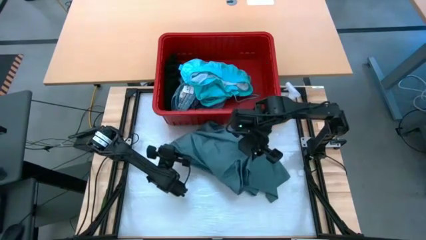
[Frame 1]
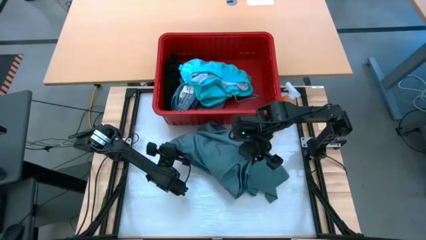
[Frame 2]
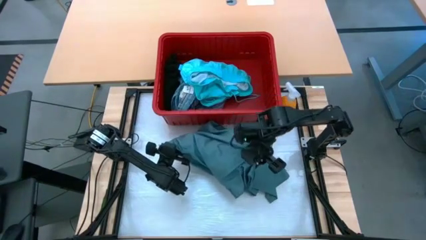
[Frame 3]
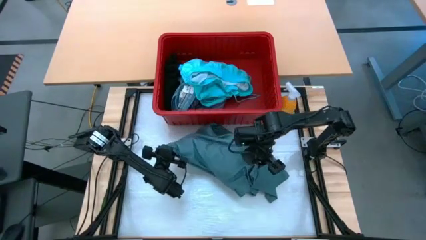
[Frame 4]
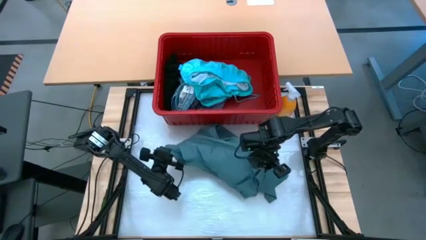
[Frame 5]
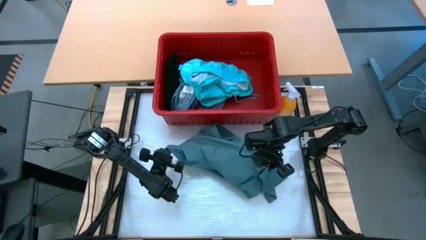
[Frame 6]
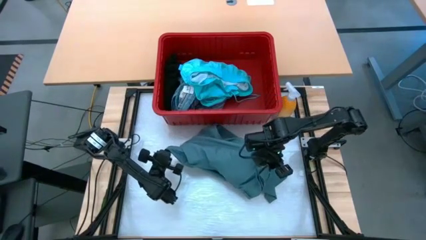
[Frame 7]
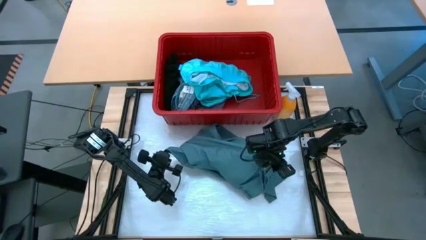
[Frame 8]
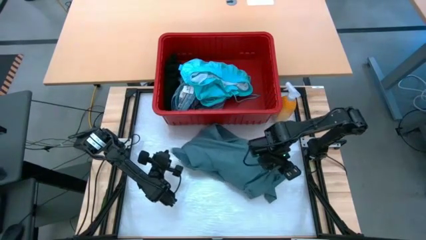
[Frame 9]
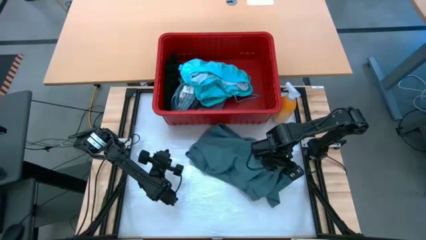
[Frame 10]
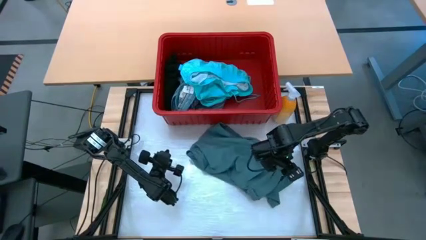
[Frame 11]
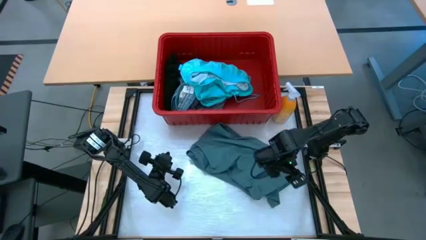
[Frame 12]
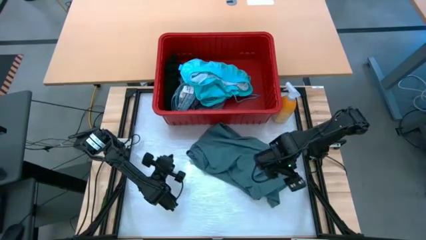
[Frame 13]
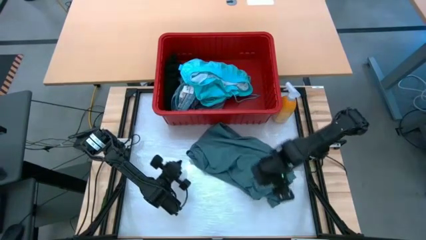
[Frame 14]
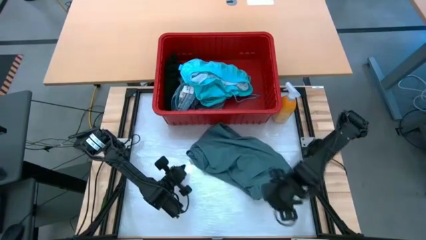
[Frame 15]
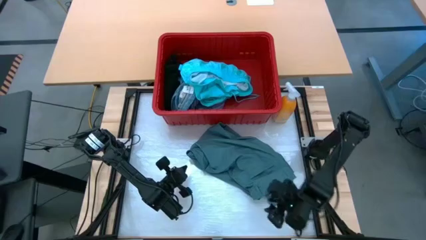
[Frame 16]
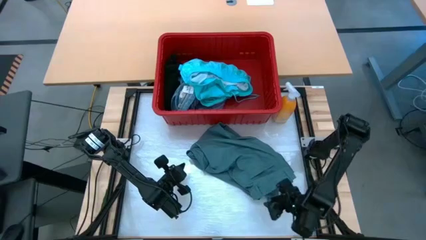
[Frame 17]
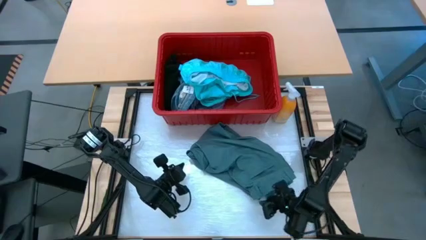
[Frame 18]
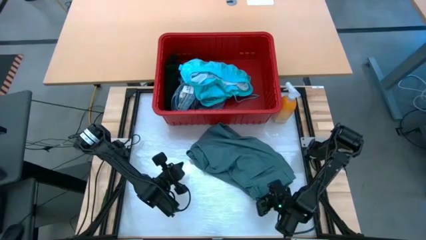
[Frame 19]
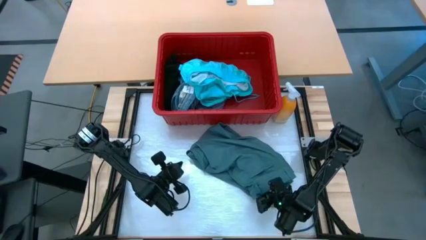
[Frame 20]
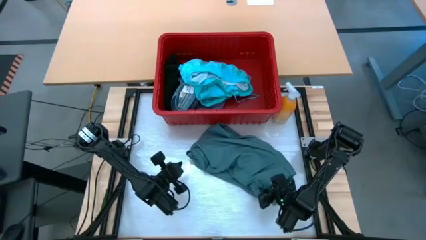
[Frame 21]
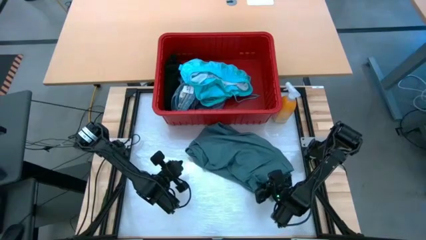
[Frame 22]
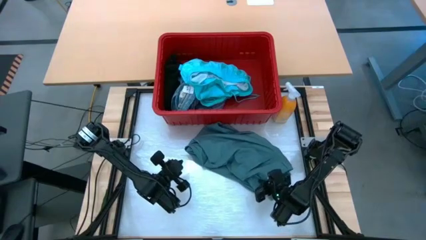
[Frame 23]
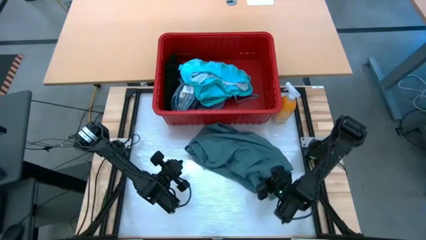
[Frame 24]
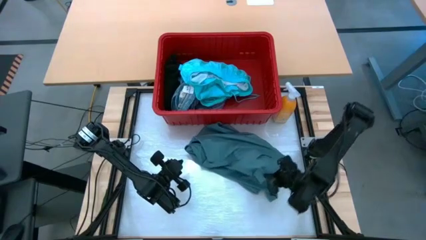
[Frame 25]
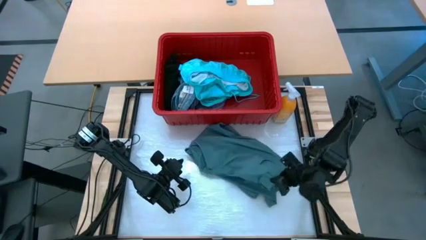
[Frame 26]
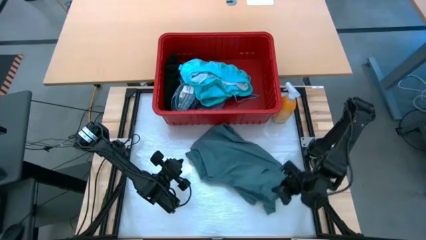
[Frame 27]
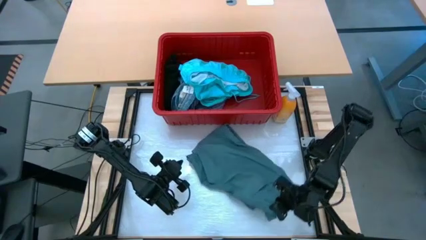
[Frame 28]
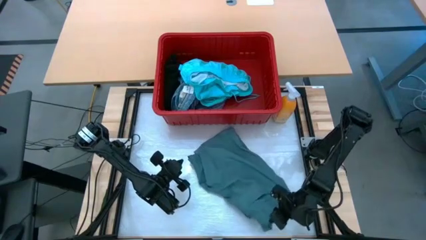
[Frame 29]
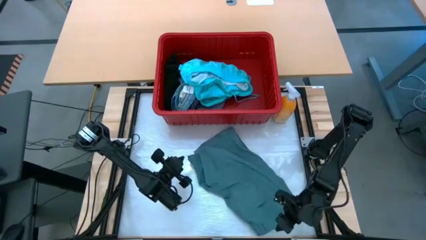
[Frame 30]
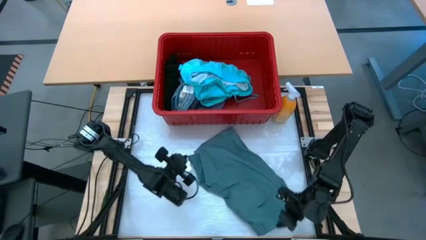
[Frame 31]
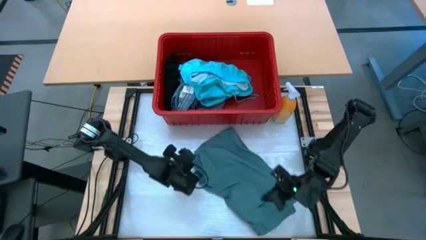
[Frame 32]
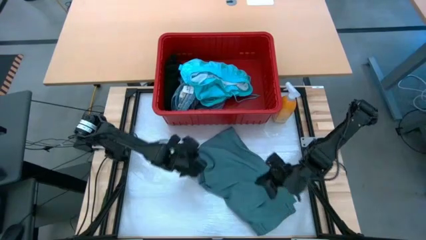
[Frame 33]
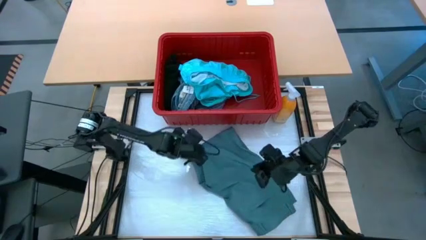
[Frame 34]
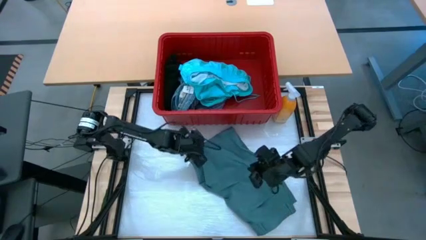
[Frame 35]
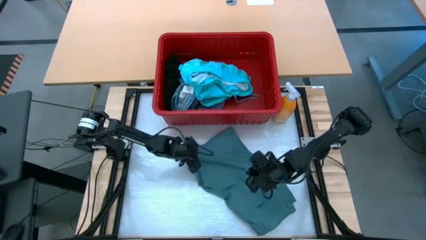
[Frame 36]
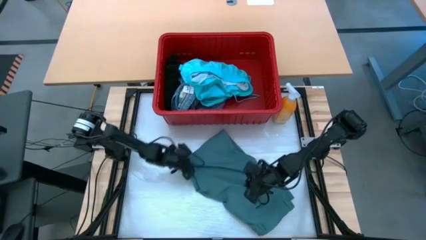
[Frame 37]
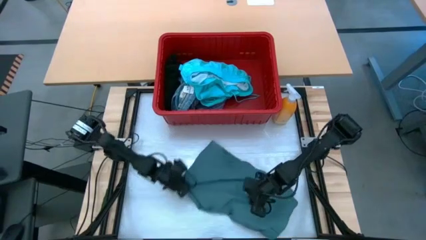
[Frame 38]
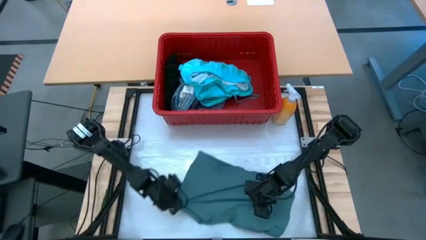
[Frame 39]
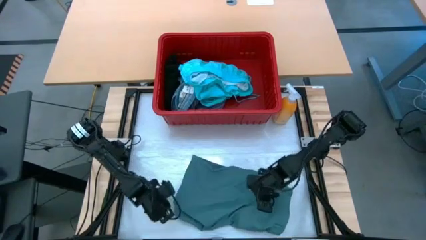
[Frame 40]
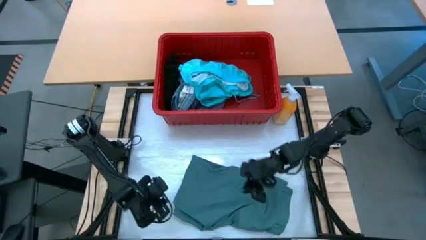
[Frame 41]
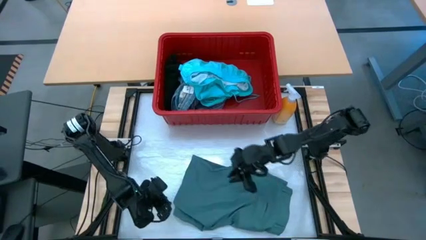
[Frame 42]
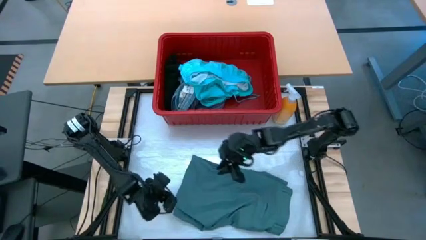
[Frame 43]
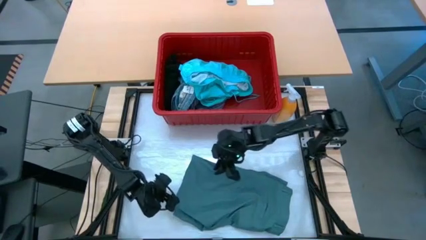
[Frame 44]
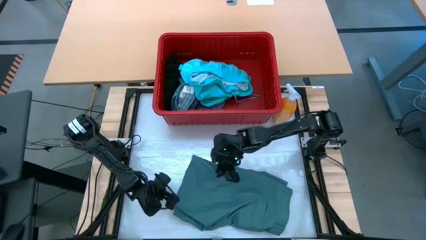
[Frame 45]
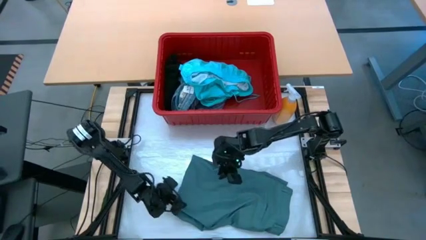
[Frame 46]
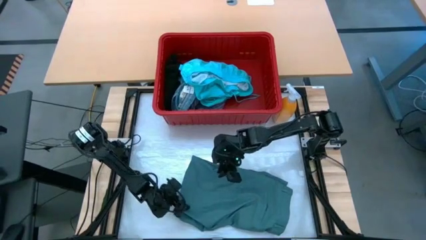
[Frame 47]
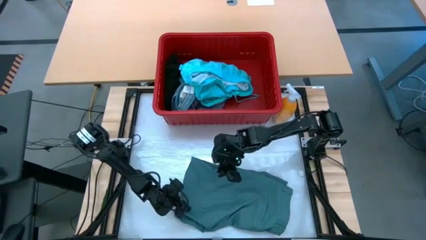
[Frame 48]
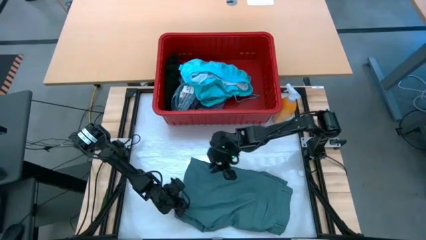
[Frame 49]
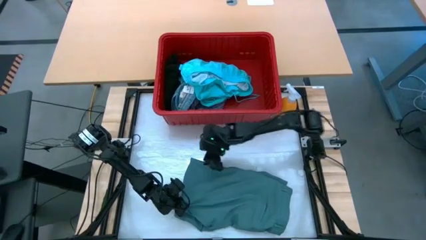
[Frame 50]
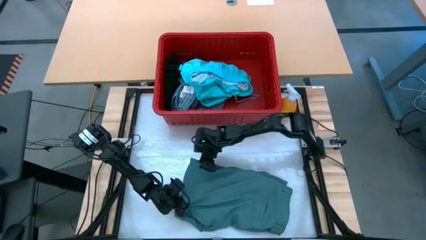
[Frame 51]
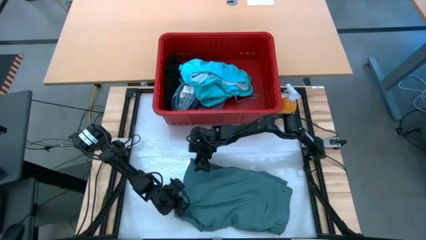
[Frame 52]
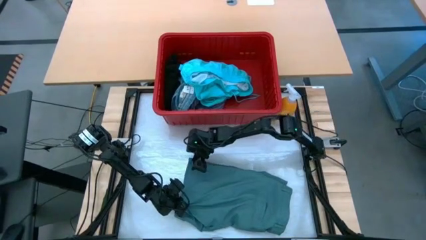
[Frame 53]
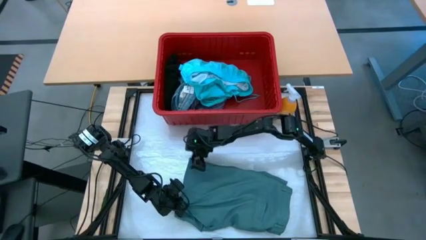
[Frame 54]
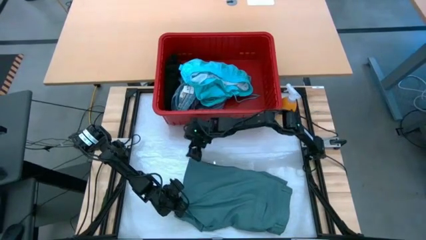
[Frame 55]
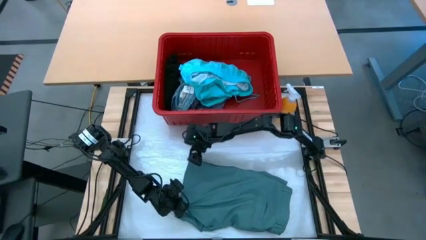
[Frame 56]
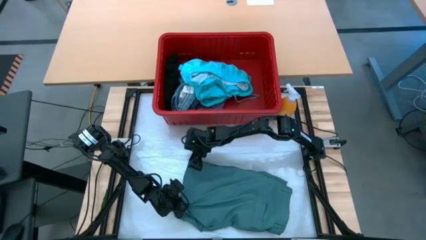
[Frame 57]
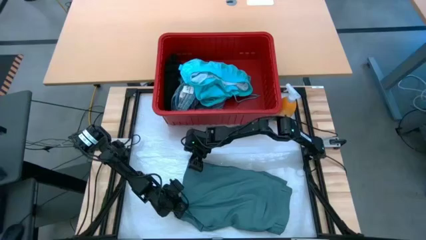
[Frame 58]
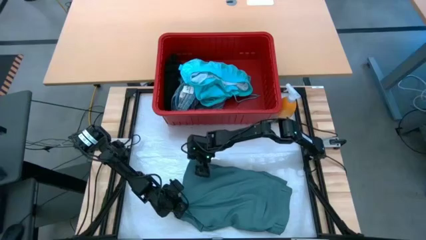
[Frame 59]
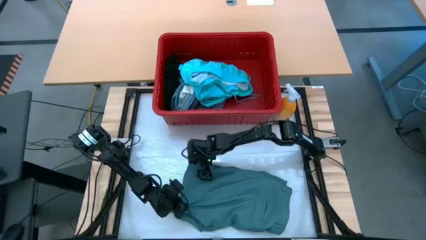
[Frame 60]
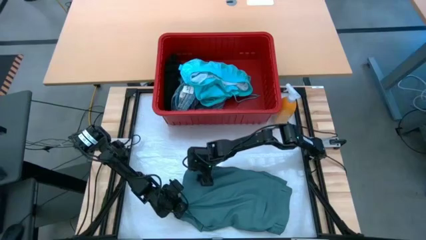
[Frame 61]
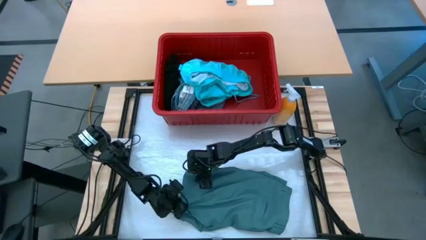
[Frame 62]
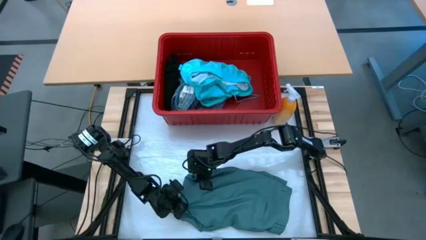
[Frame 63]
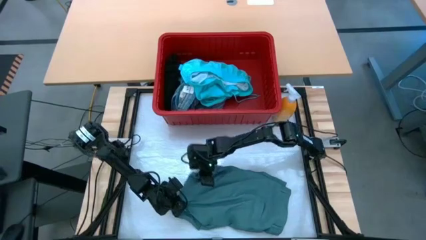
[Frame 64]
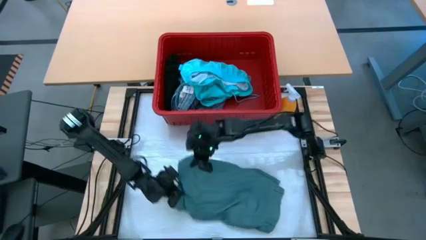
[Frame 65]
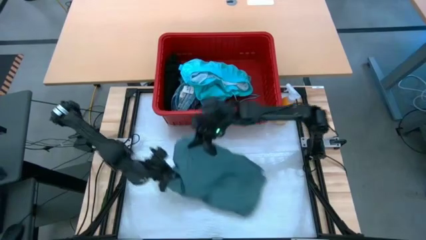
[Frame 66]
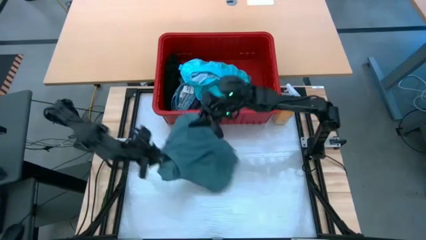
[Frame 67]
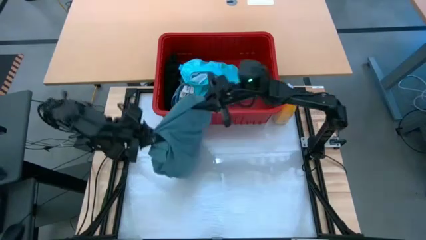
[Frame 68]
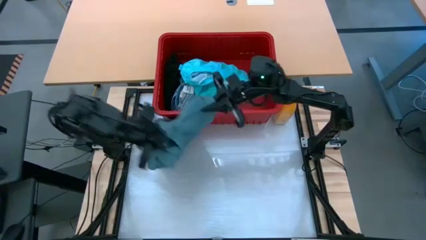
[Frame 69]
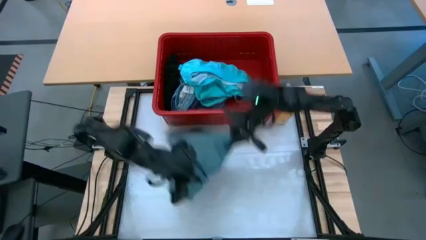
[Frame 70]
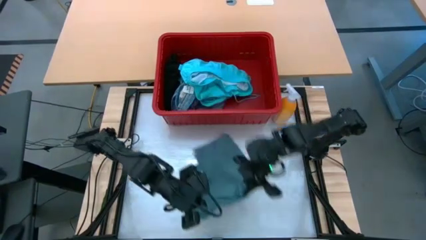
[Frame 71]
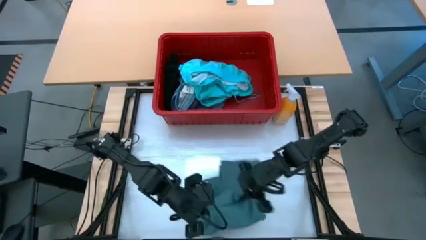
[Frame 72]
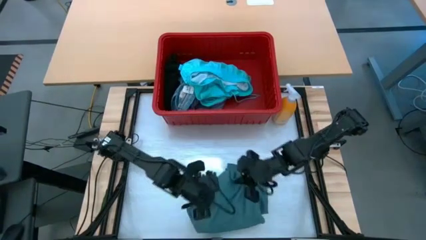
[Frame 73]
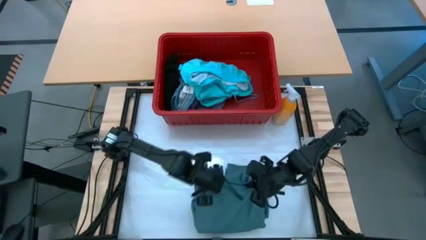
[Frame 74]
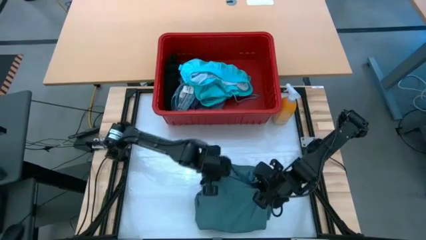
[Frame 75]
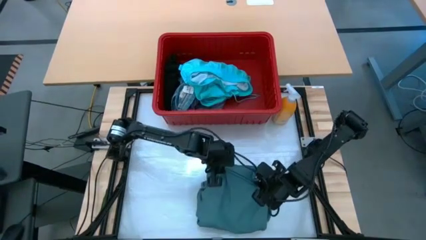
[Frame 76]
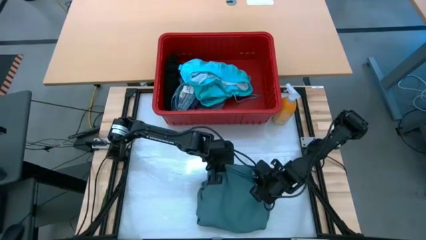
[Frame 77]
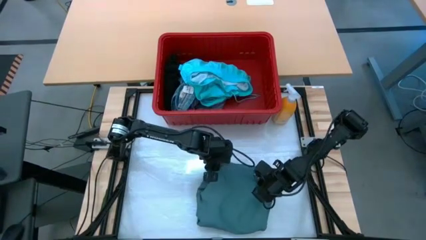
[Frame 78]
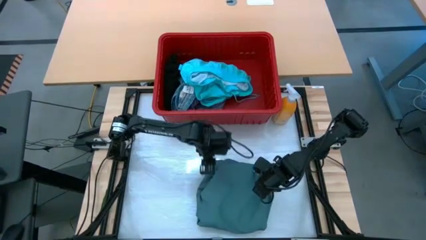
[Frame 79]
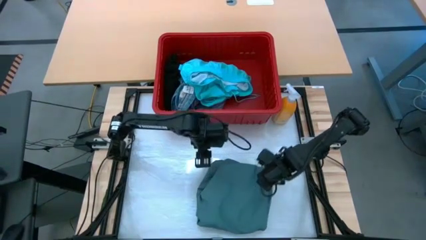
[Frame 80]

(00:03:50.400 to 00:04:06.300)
Task: Fold Laundry from Bin
Fold the light blue pants
